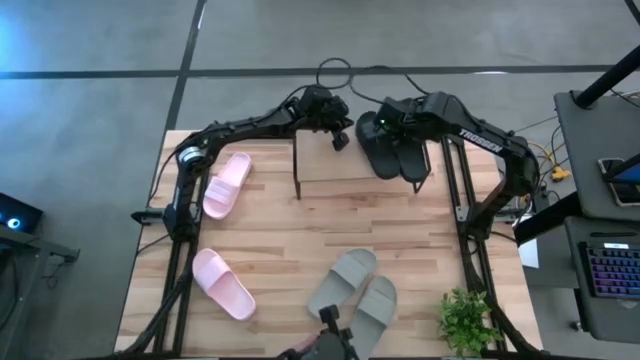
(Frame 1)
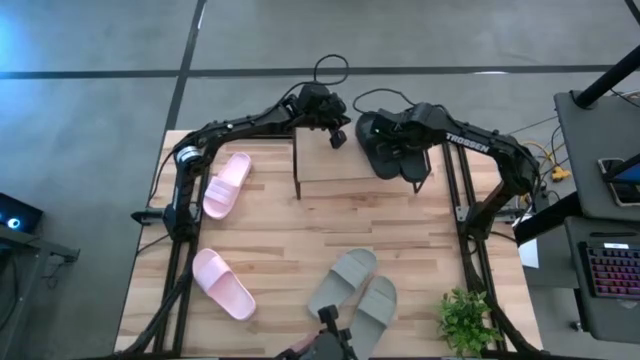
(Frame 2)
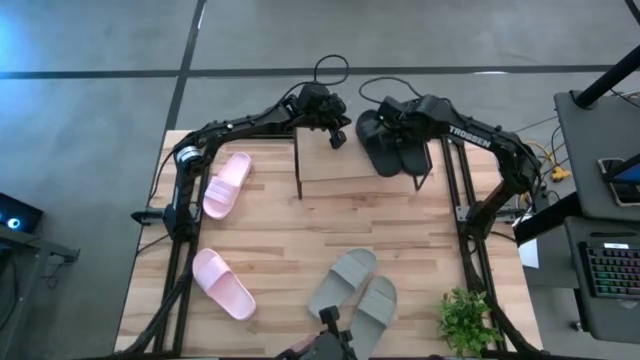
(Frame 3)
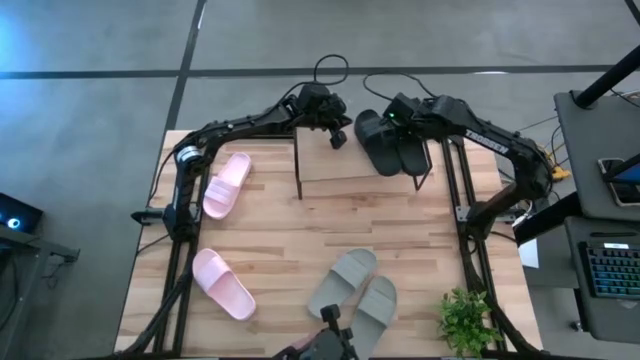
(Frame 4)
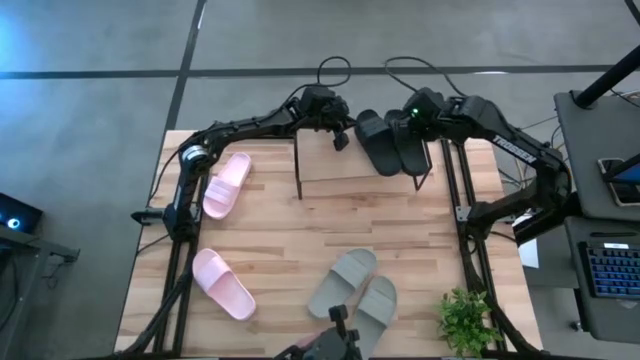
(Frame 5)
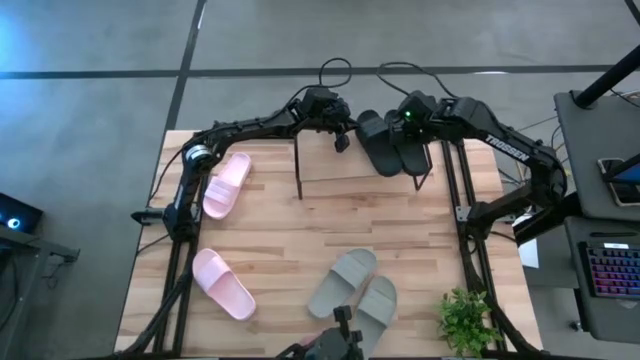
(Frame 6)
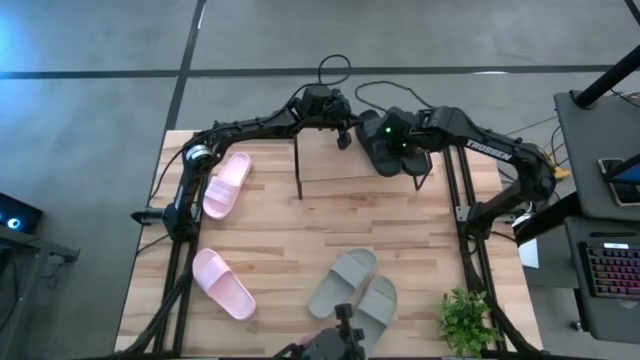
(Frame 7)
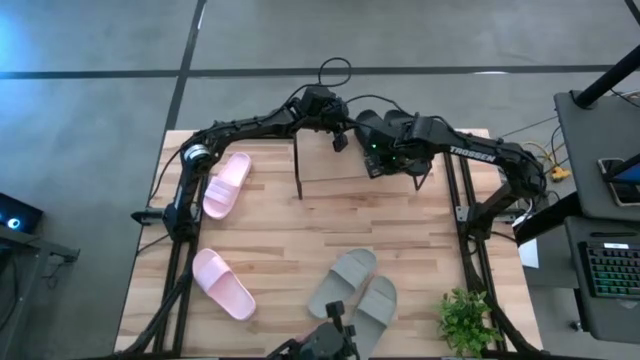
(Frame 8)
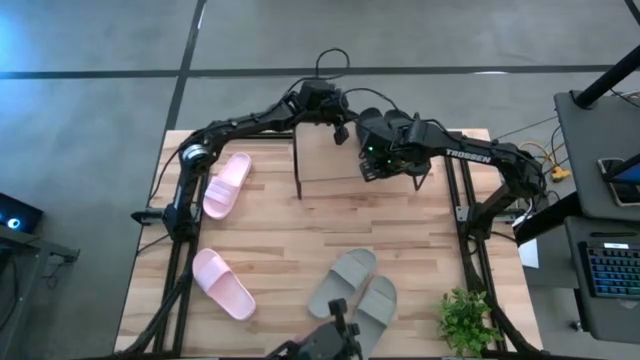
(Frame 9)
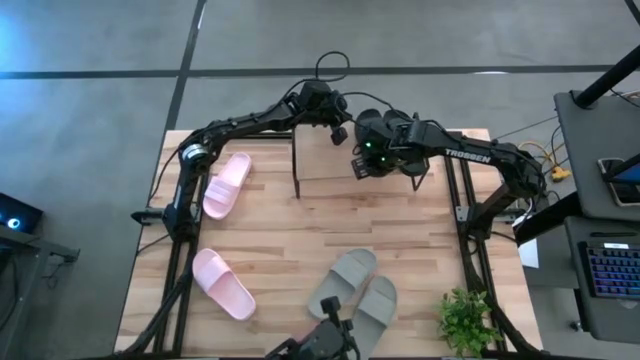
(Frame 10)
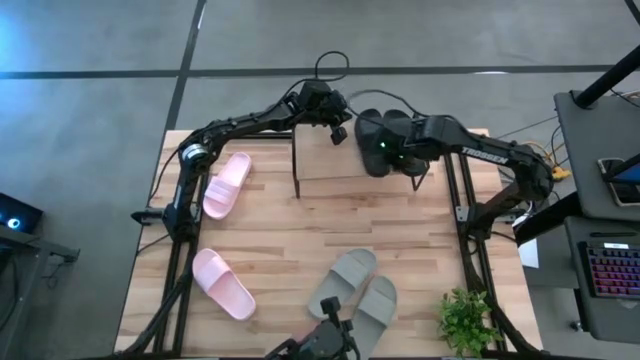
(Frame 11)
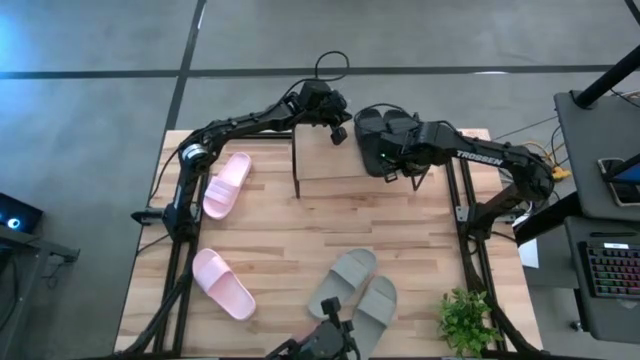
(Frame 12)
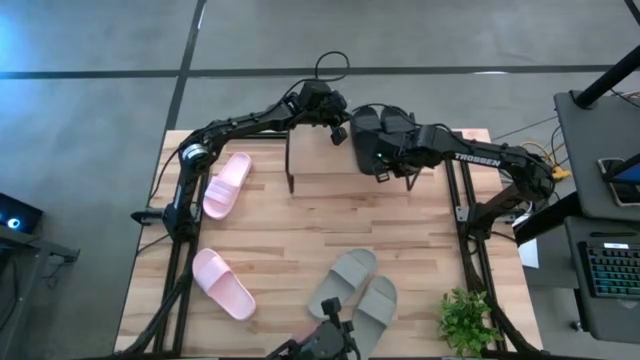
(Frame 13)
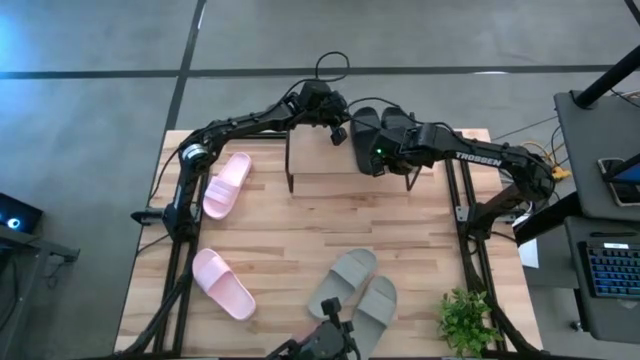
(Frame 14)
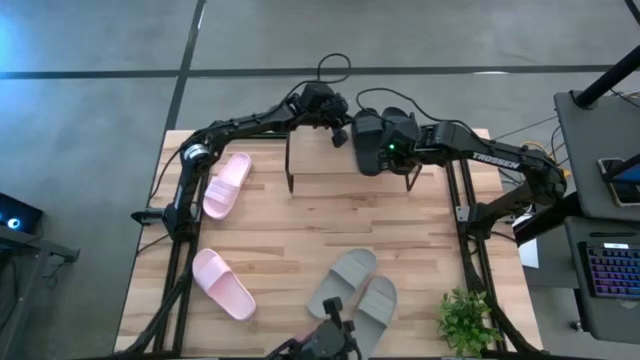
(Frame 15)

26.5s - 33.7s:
Task: Pick and place slides into the shelf
Adjust the pair of black slides on the shelf

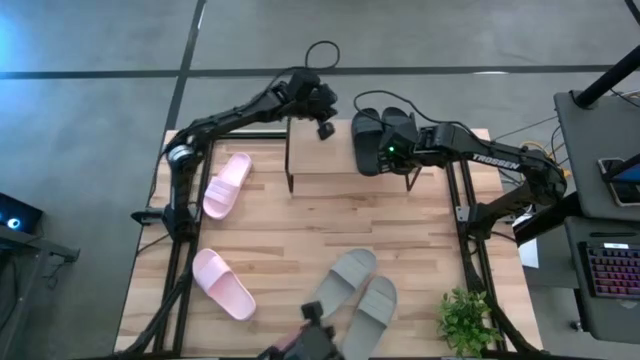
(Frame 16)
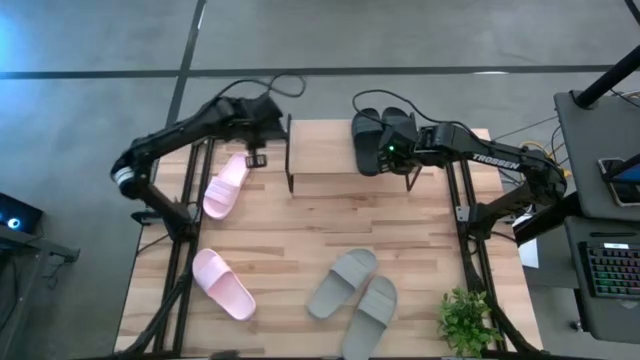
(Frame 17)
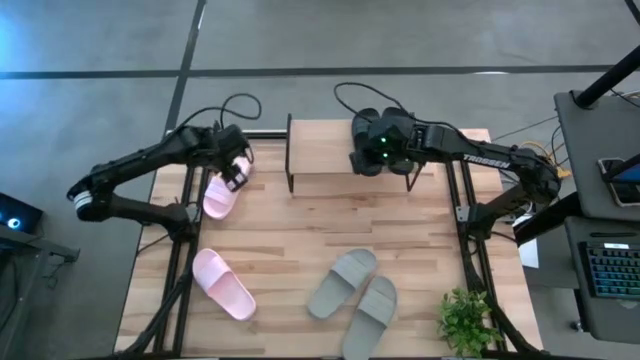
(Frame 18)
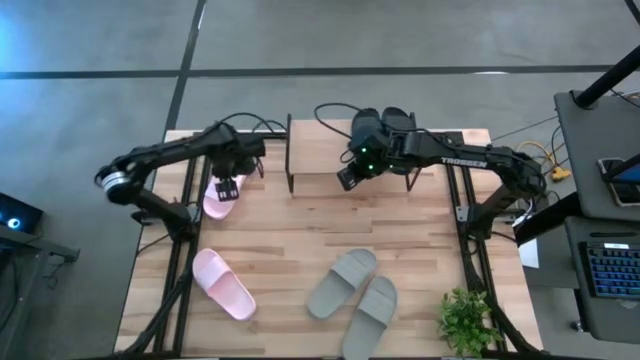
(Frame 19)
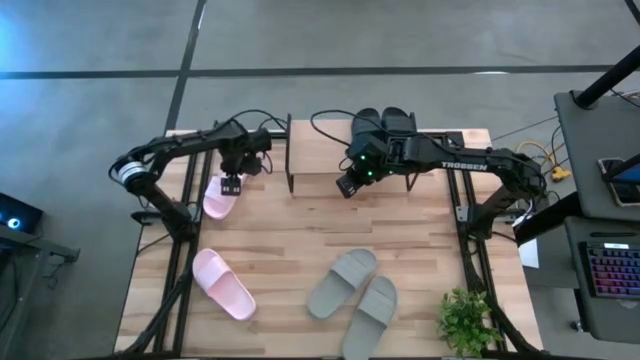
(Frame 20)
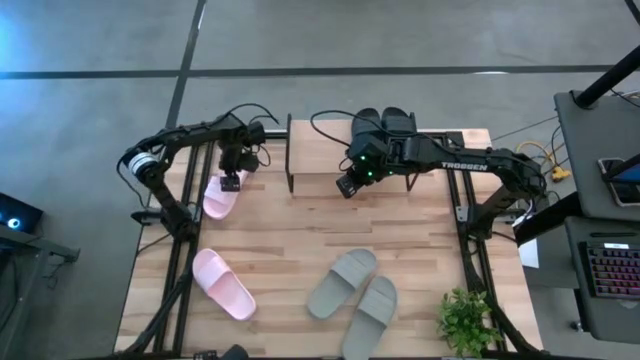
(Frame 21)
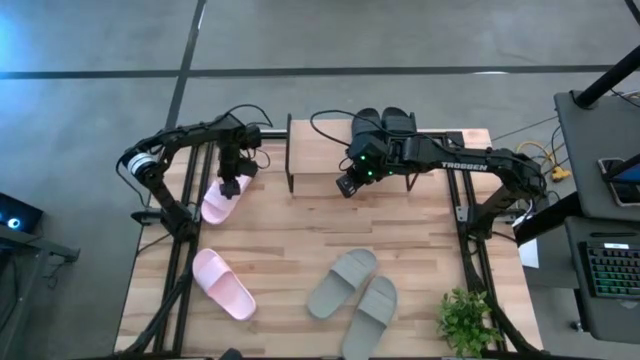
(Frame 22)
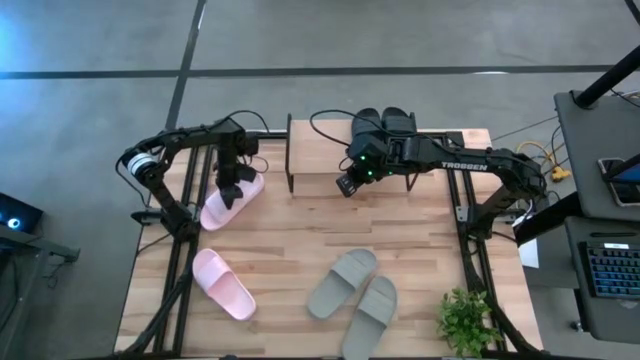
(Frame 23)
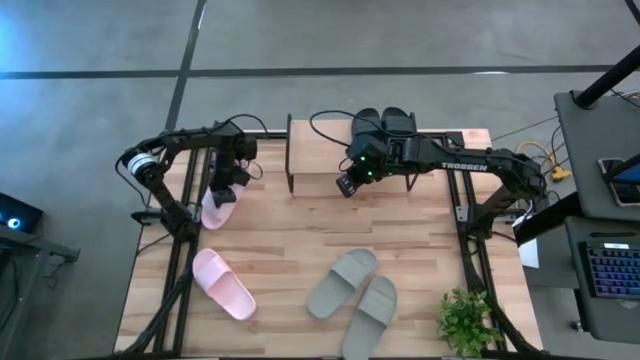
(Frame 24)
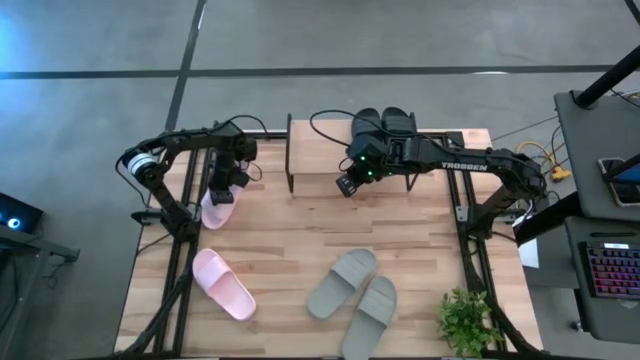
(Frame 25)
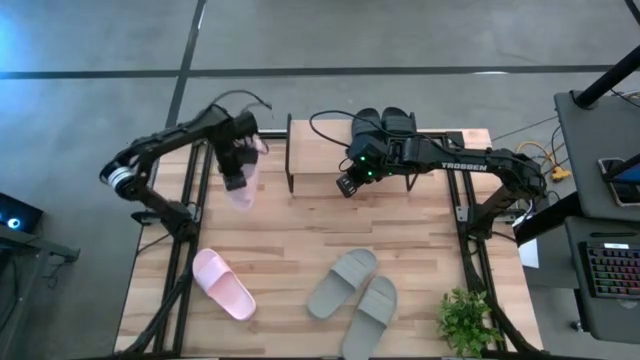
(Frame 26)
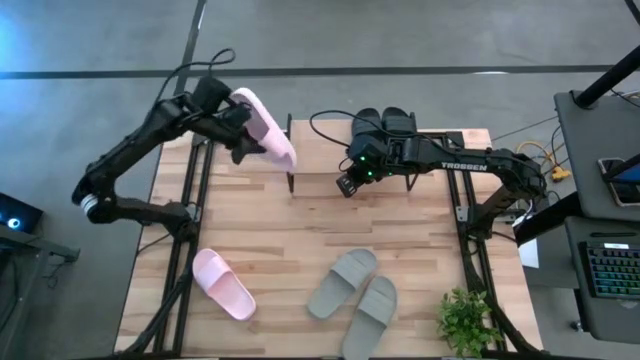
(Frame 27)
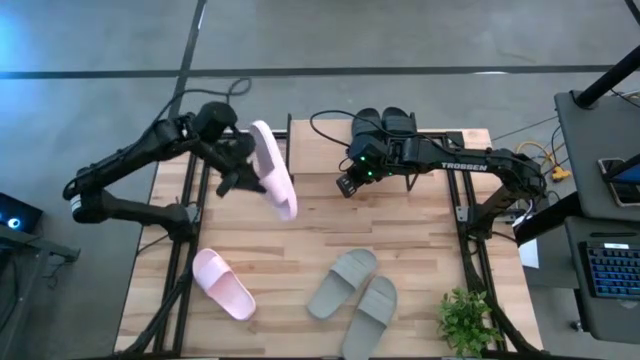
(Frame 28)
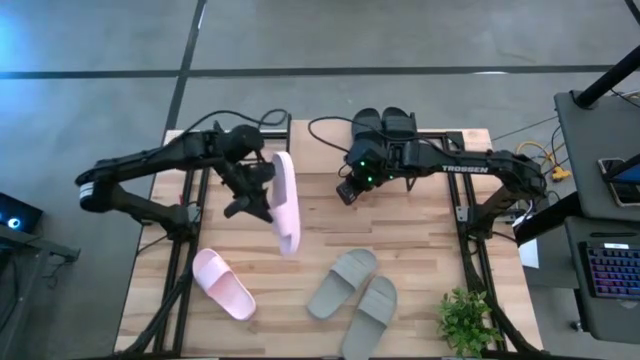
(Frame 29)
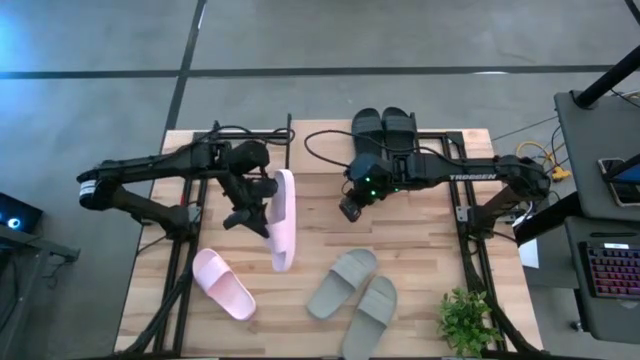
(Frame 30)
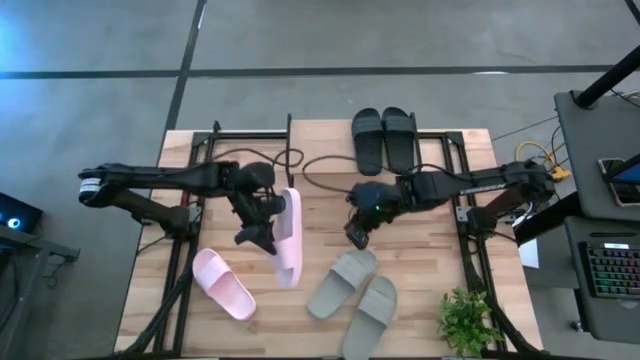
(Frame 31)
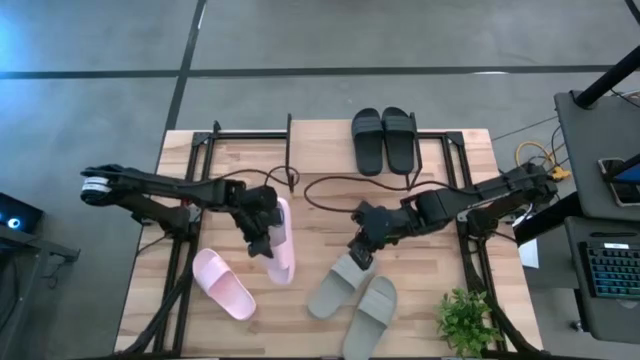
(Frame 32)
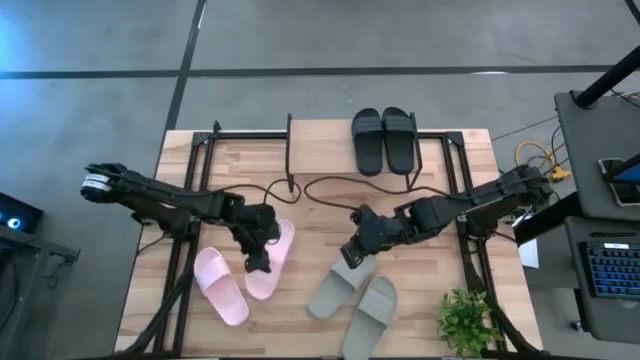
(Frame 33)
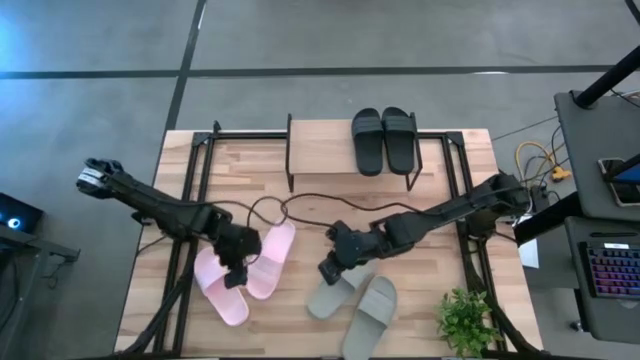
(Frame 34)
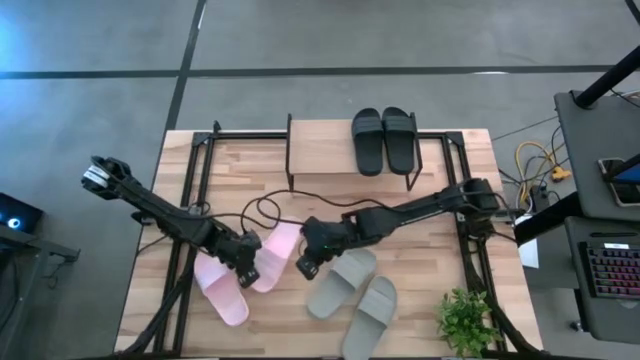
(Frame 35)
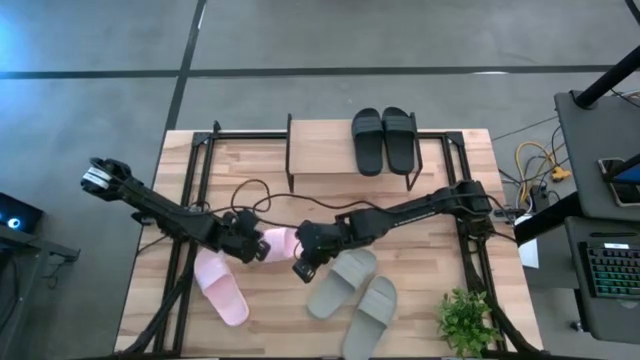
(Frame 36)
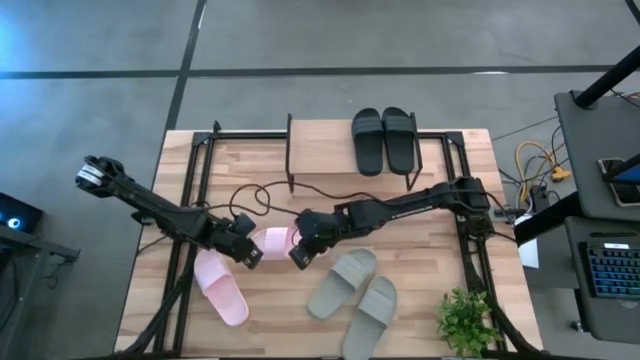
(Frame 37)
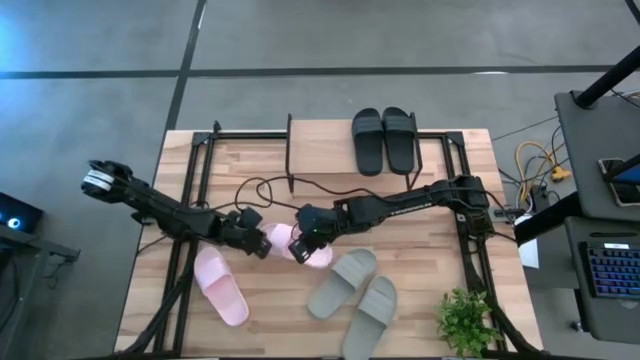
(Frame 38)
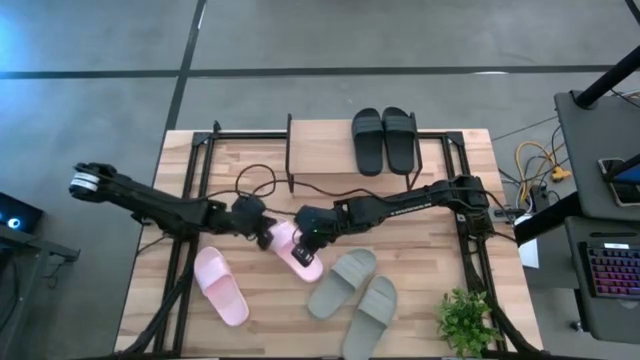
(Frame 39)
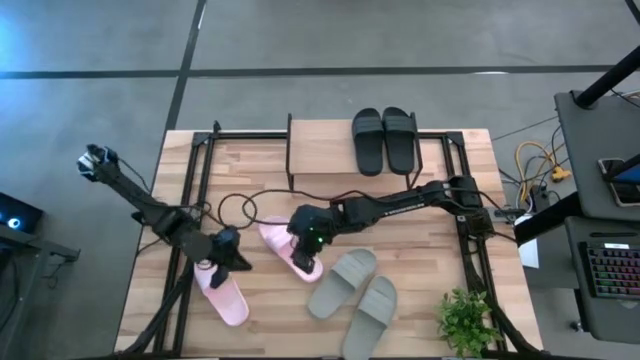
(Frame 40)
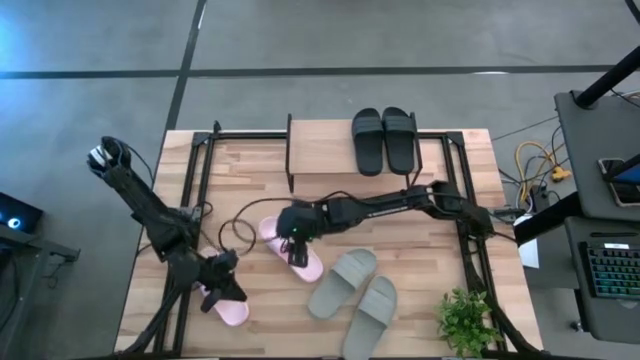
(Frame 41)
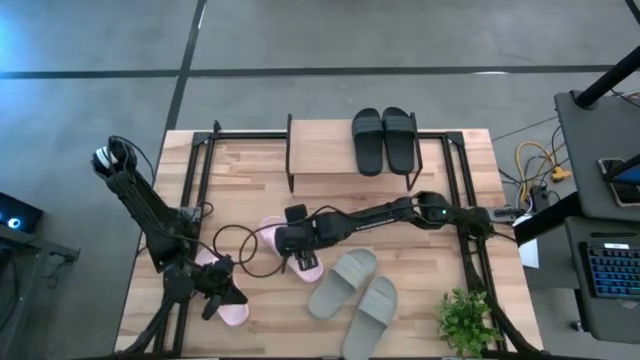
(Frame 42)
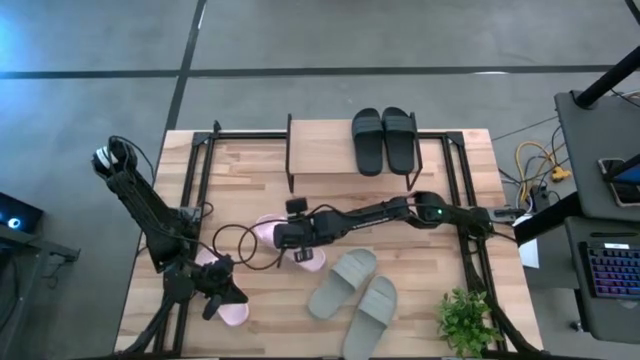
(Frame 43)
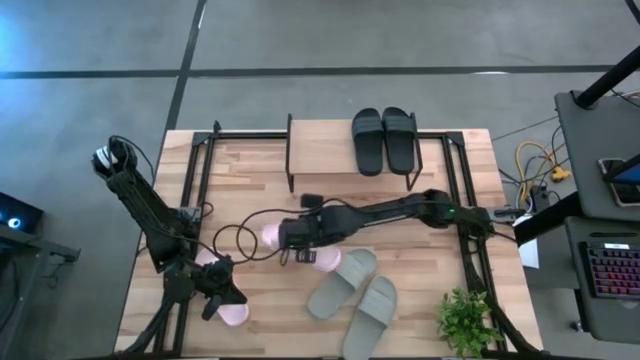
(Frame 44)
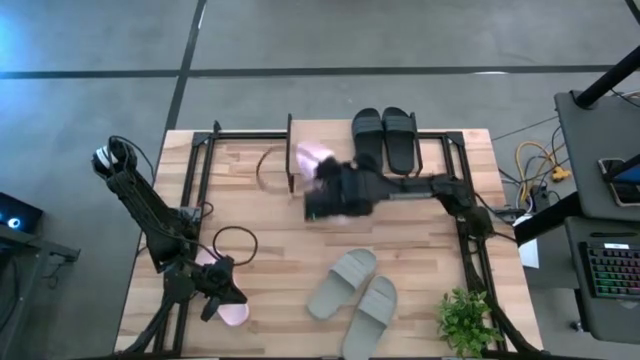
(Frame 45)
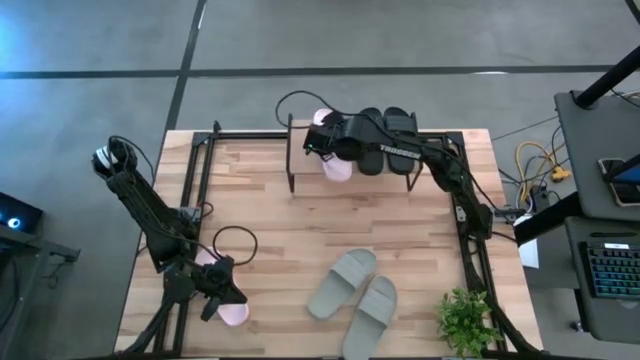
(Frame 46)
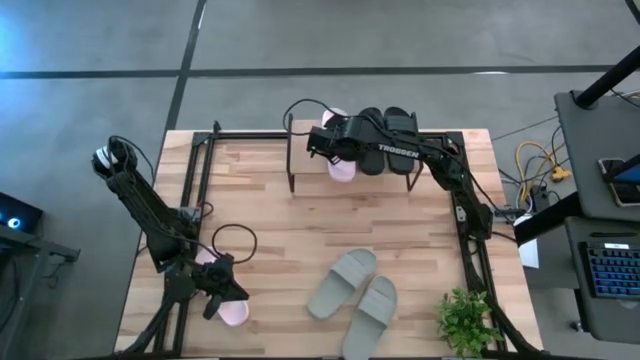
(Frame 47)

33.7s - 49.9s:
Put the right pink slide on the shelf
